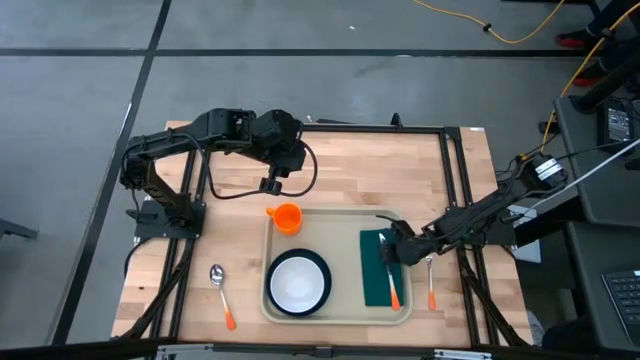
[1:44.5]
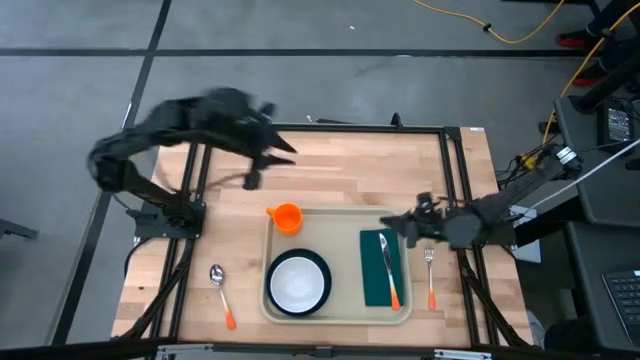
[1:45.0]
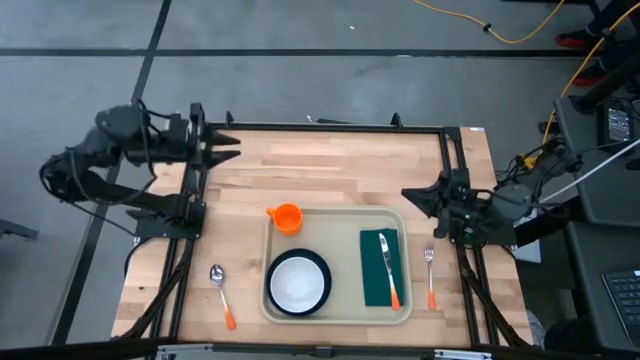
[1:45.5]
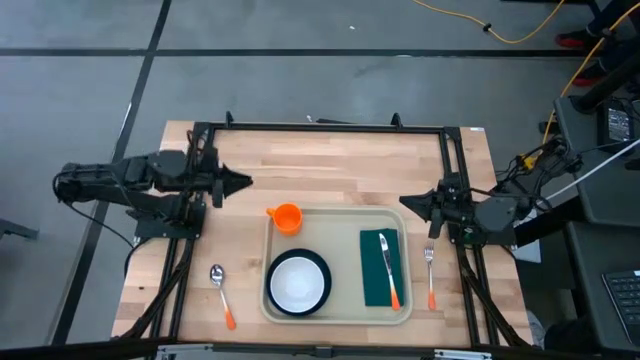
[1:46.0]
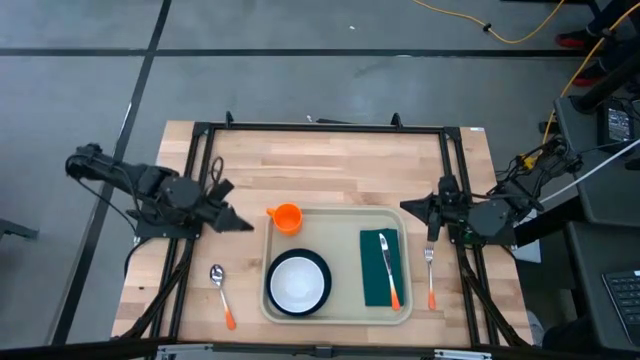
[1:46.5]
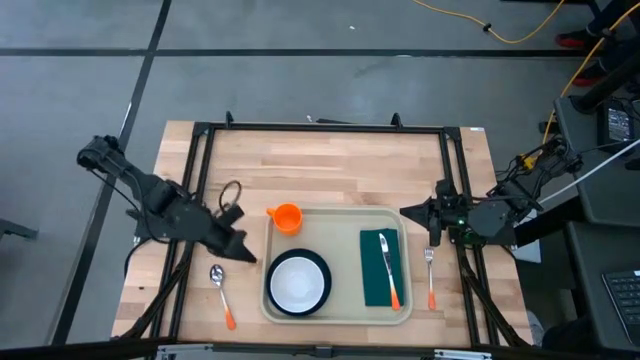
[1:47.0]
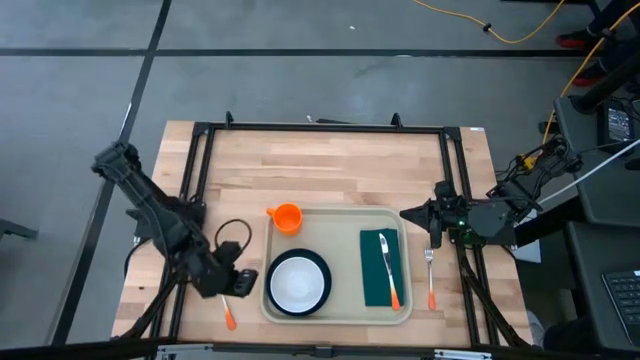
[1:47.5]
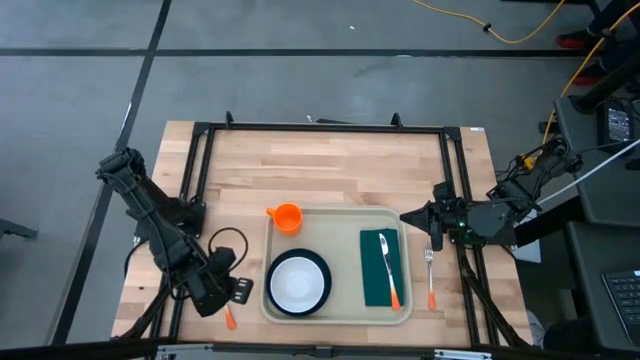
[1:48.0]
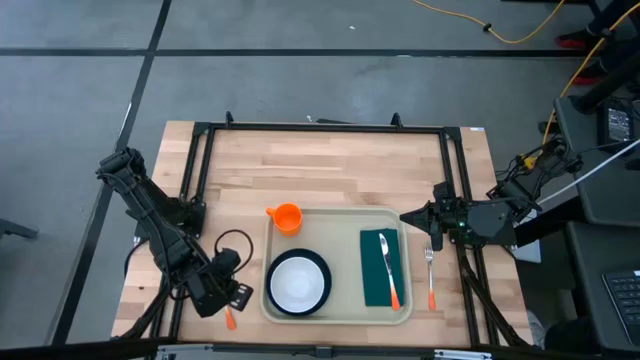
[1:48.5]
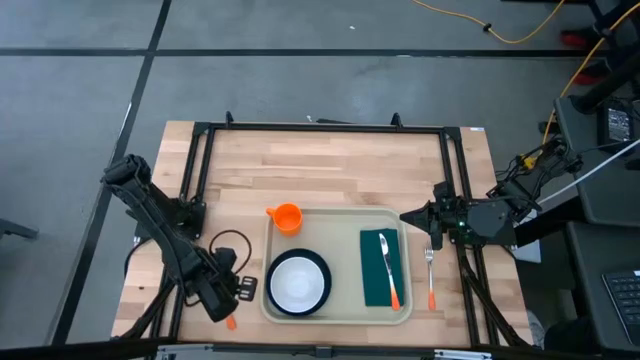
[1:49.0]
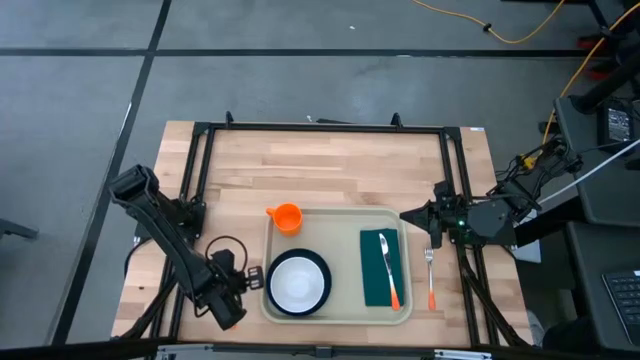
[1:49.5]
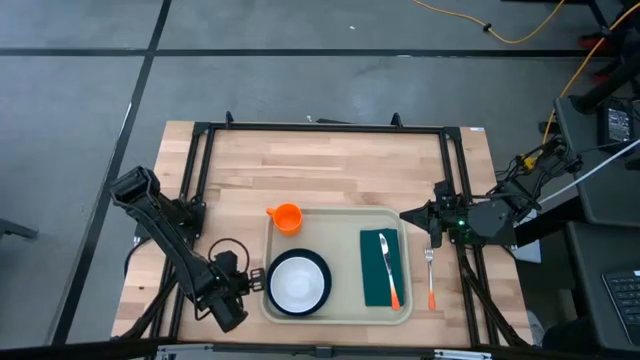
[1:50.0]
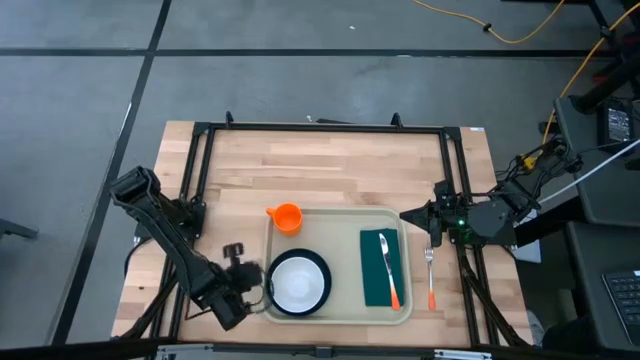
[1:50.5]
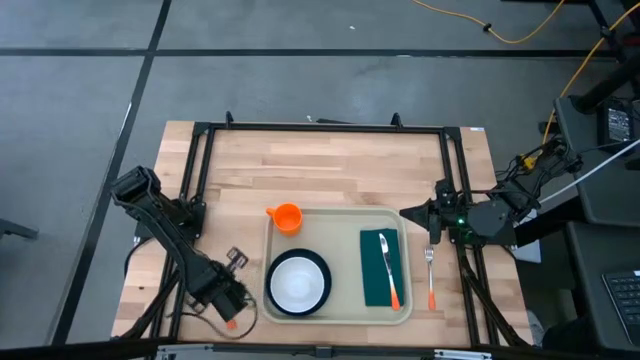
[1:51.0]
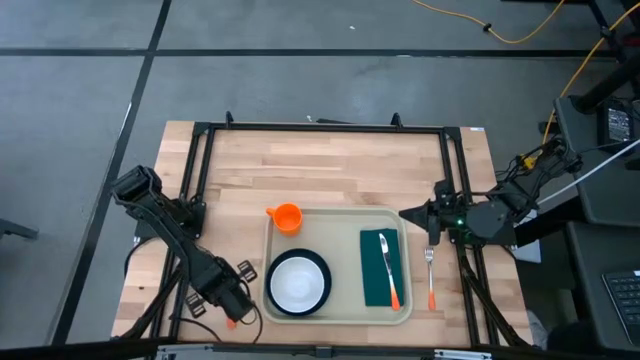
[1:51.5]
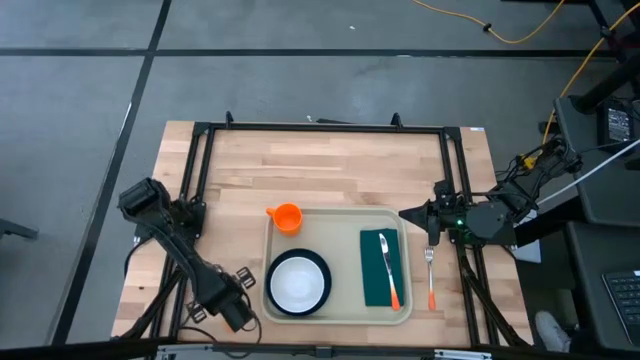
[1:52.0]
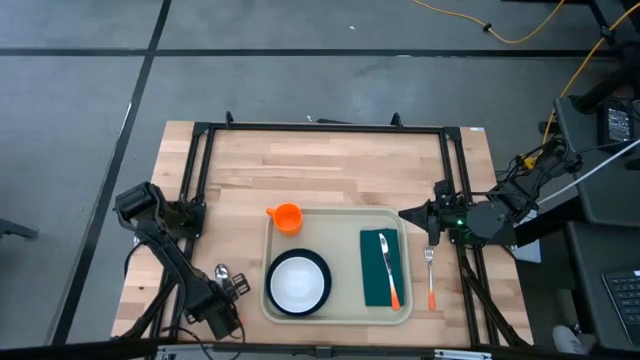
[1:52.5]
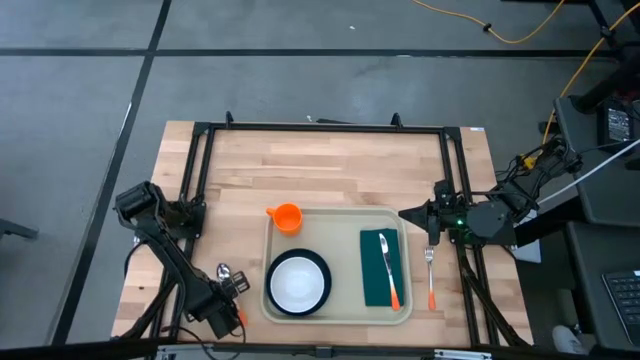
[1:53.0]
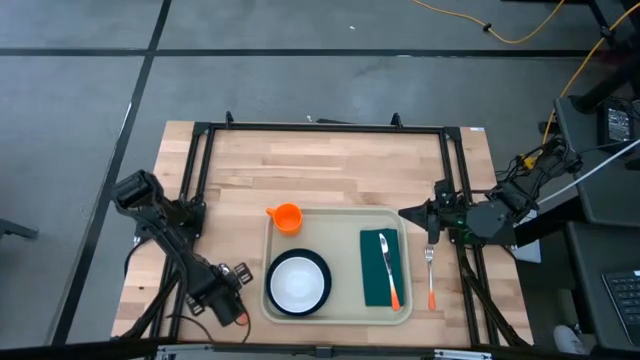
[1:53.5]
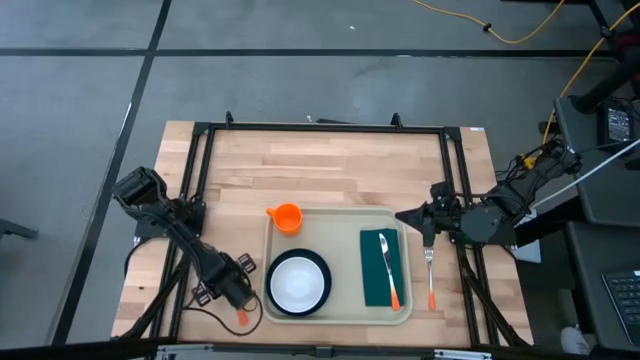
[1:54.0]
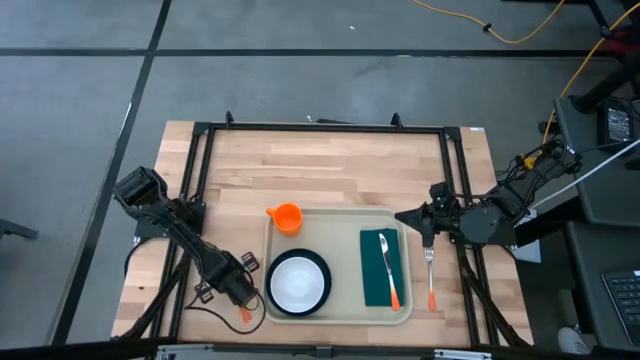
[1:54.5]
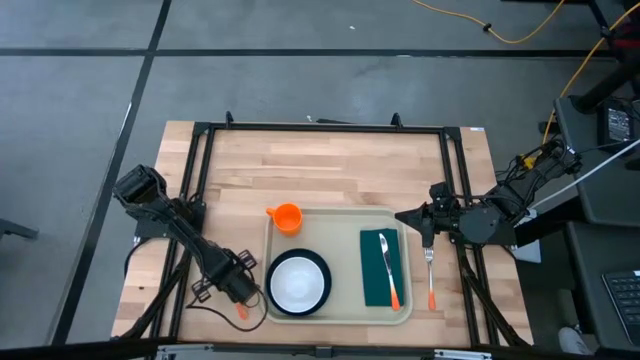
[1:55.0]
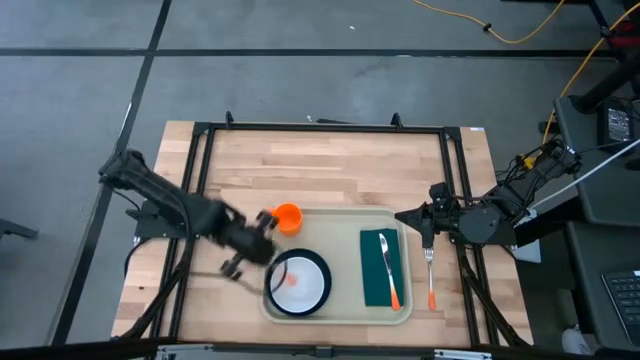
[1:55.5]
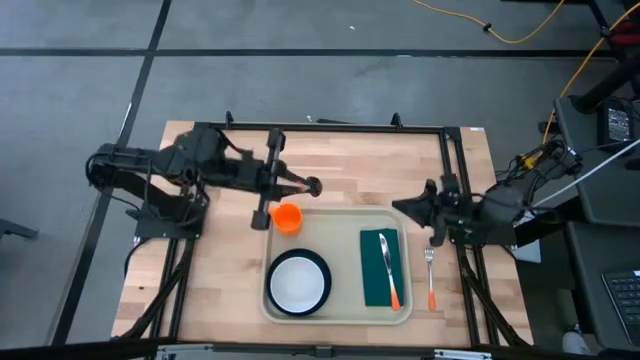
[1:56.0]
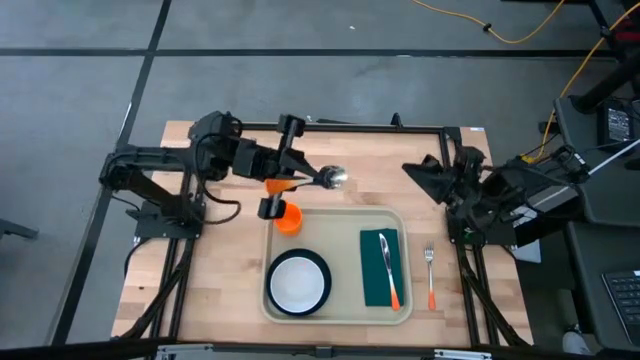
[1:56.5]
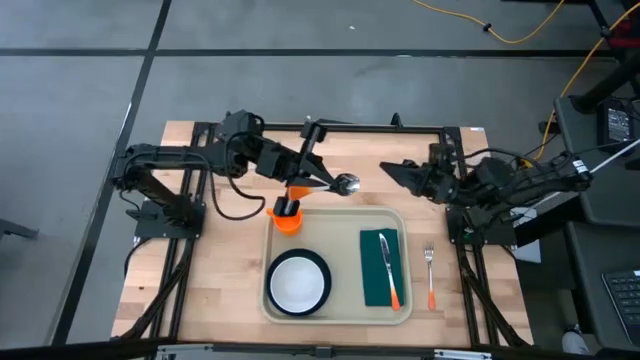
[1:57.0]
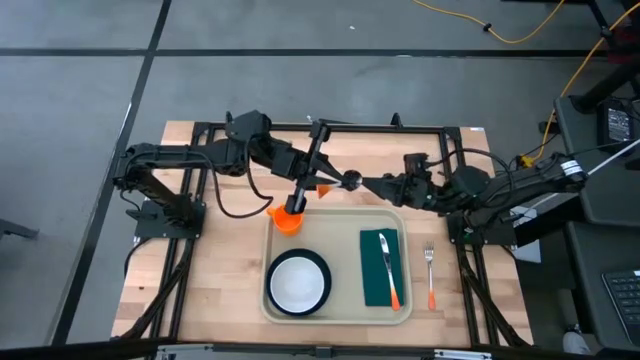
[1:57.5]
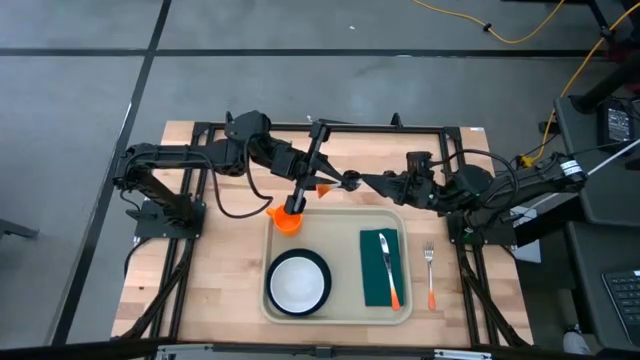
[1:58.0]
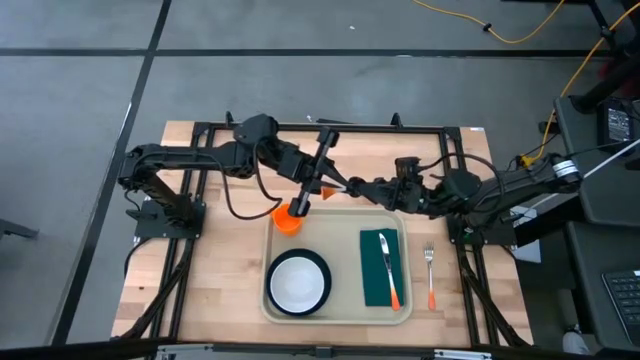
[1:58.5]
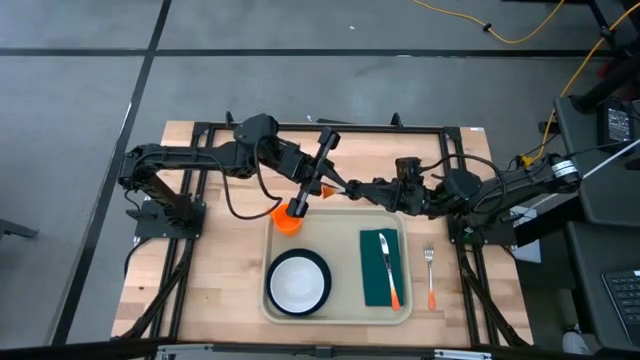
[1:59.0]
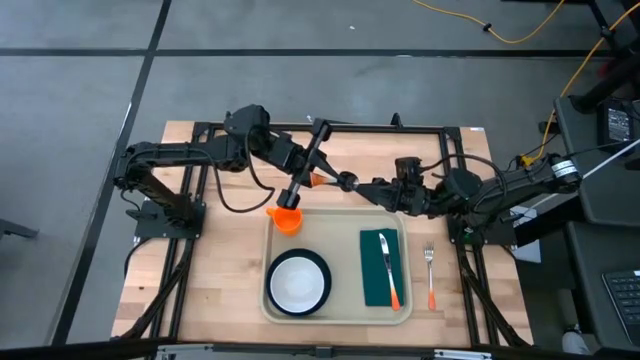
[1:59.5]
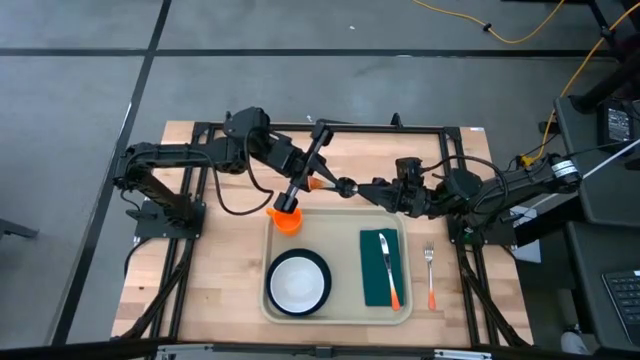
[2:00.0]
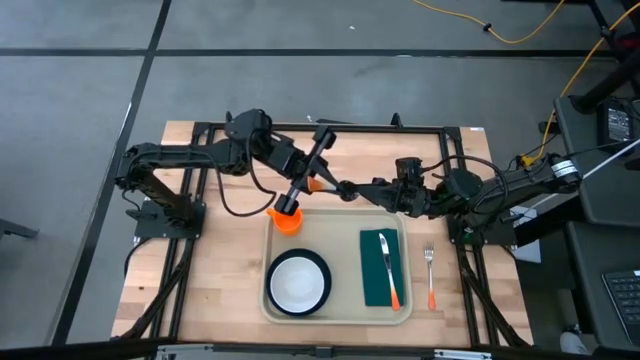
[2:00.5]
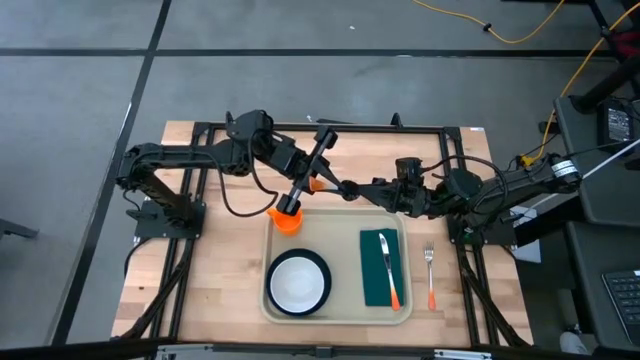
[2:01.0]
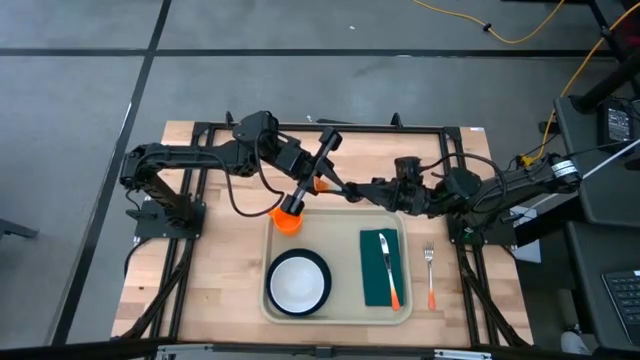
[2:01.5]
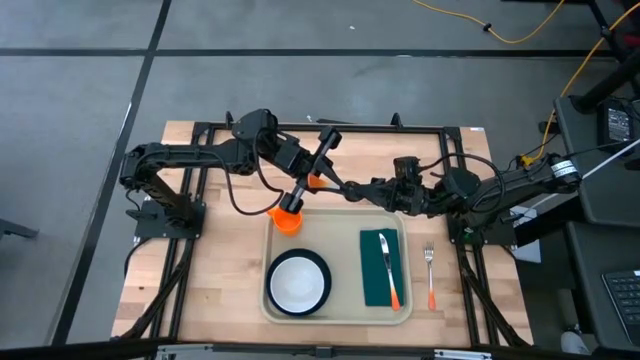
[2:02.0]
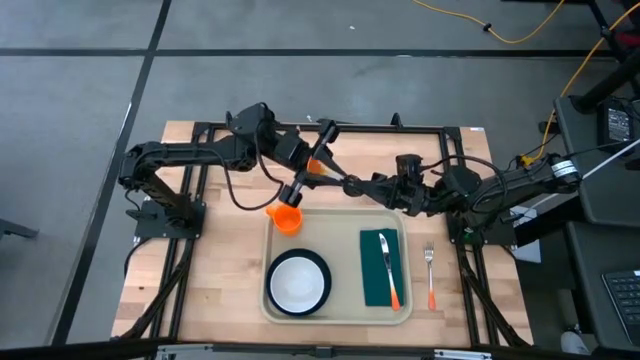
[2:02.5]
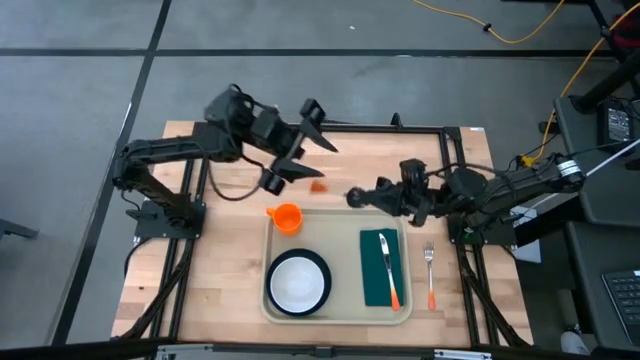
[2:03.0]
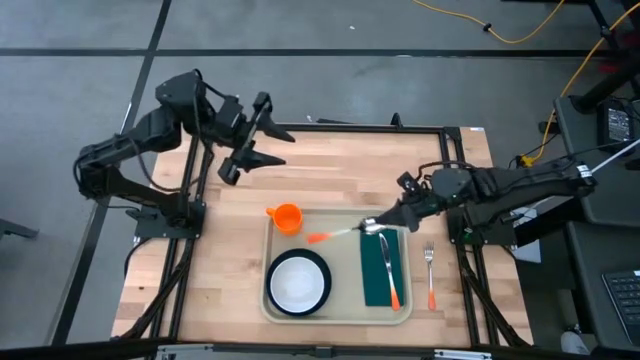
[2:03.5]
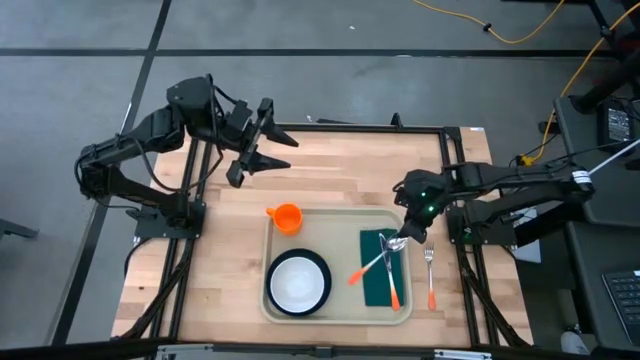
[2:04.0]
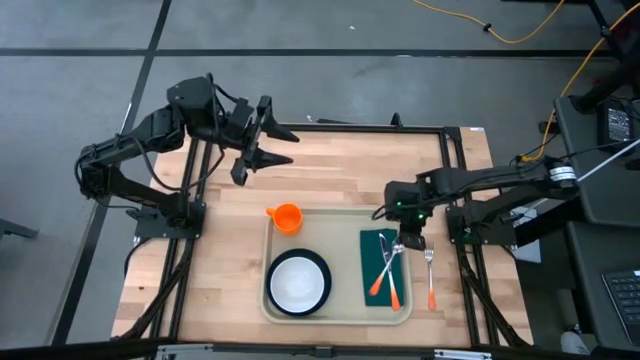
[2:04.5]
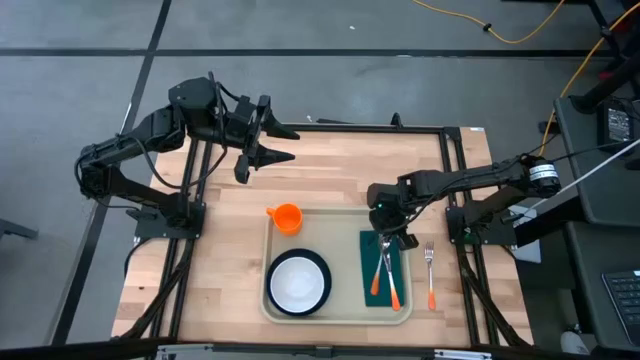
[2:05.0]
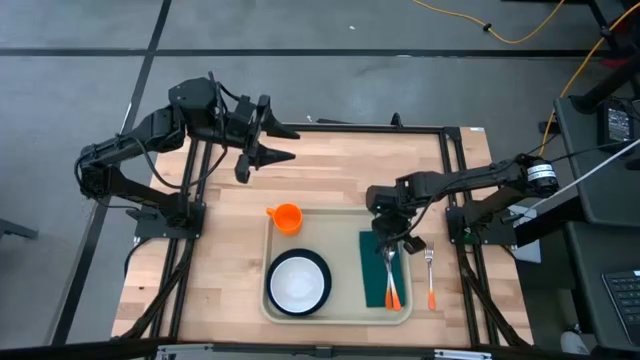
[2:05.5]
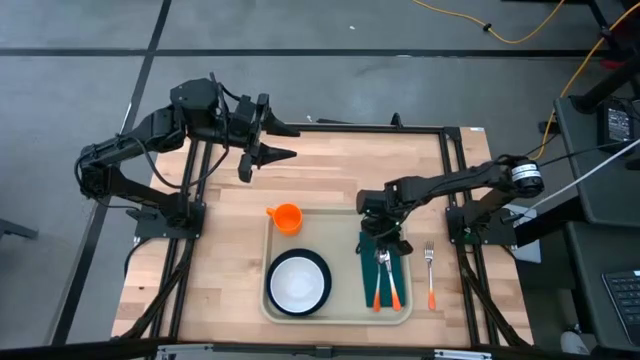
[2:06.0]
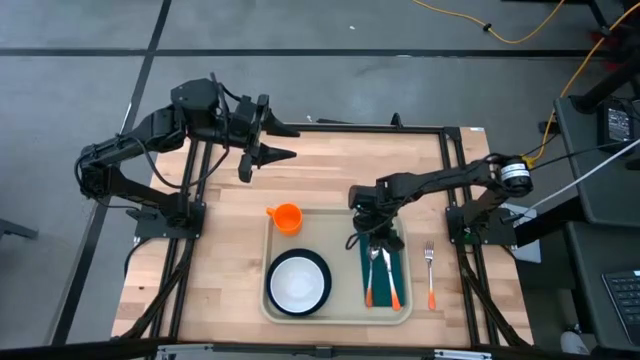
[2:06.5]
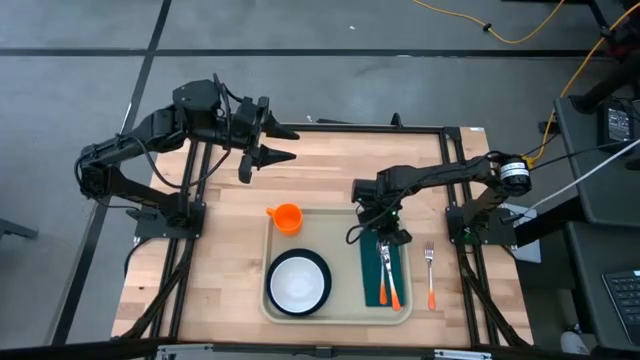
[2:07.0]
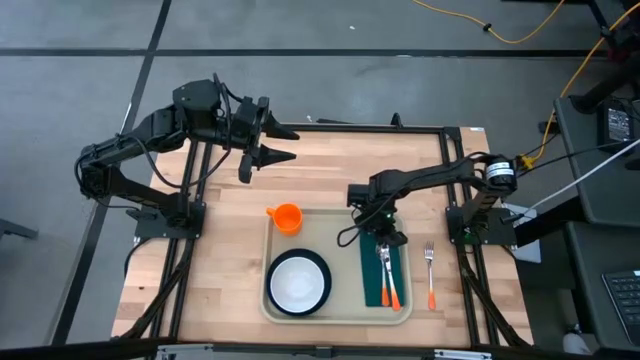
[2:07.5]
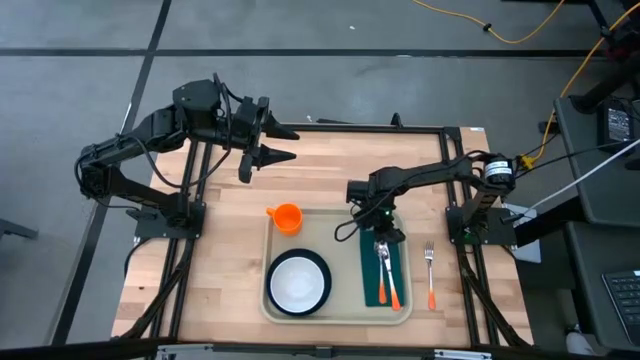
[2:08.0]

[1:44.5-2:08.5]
Task: Set up tray
Put the orange spoon on the green napkin to the left of the orange knife
